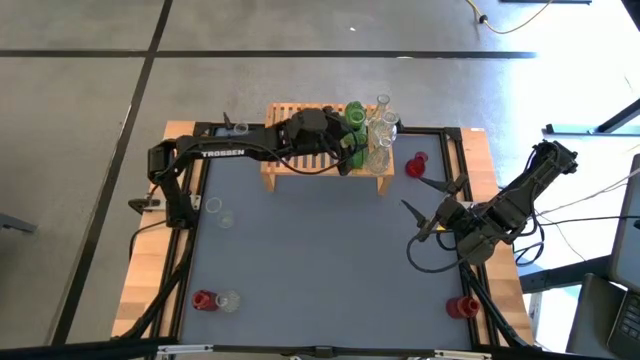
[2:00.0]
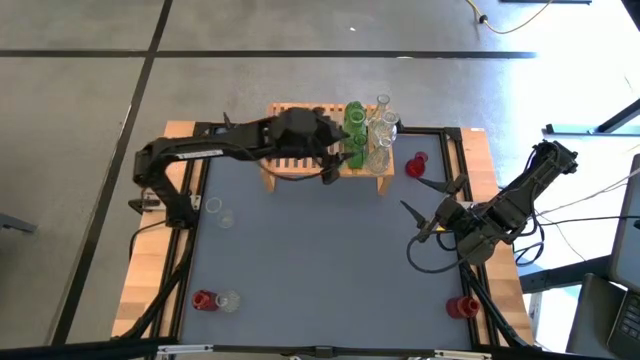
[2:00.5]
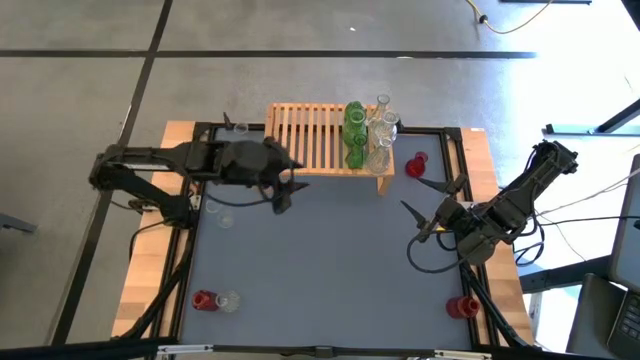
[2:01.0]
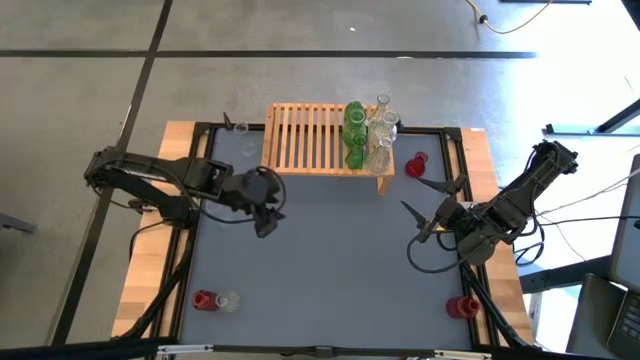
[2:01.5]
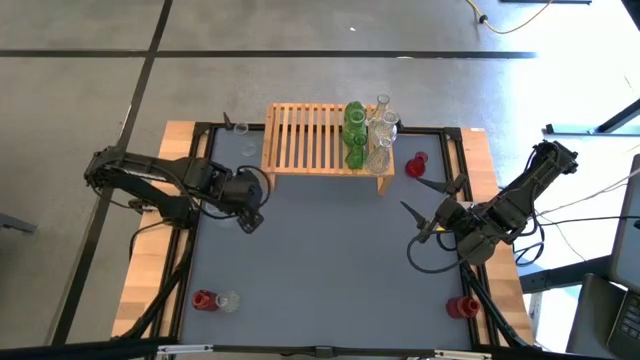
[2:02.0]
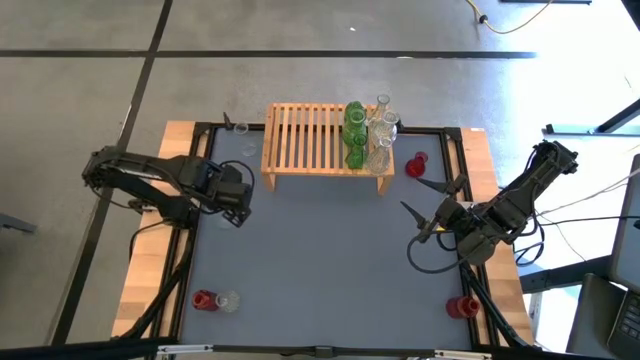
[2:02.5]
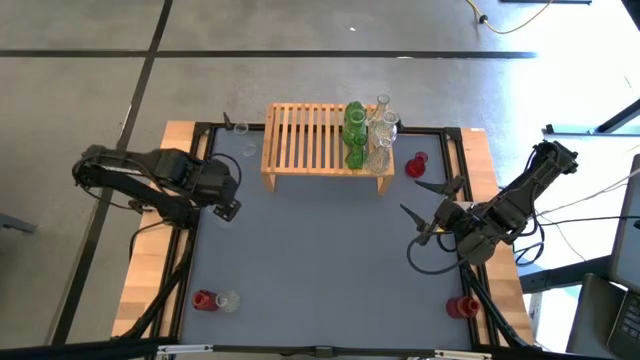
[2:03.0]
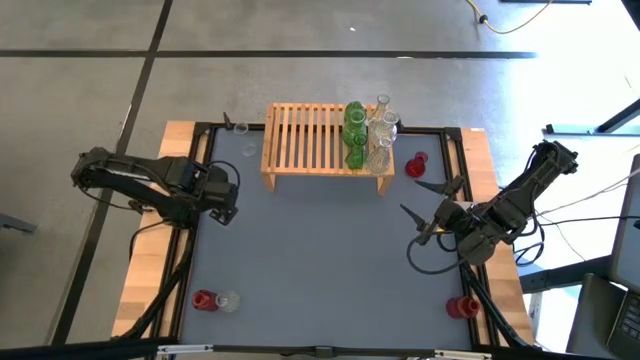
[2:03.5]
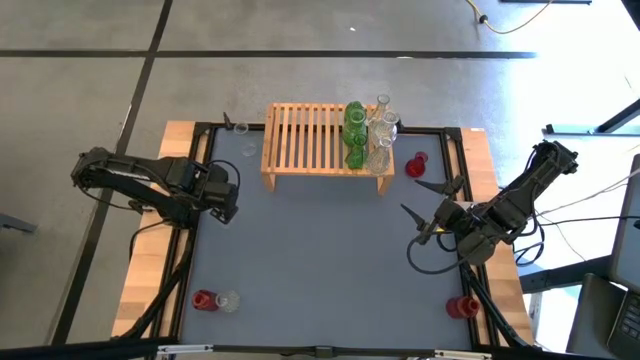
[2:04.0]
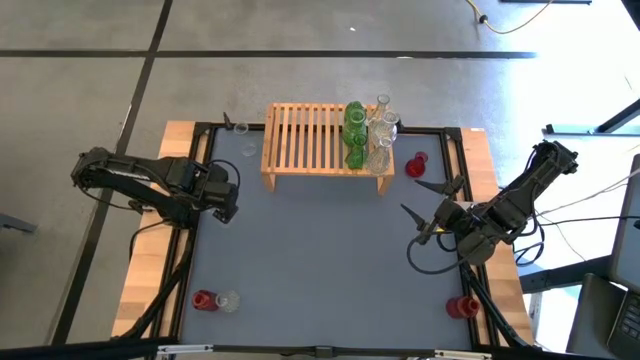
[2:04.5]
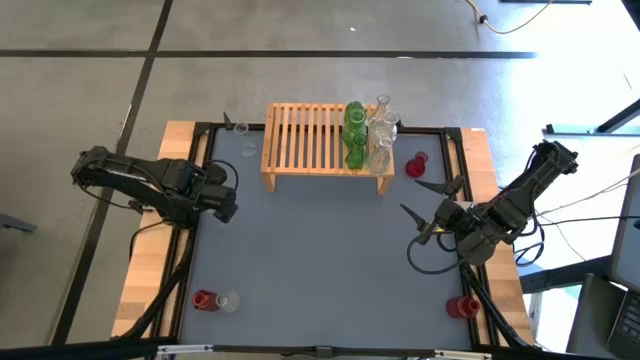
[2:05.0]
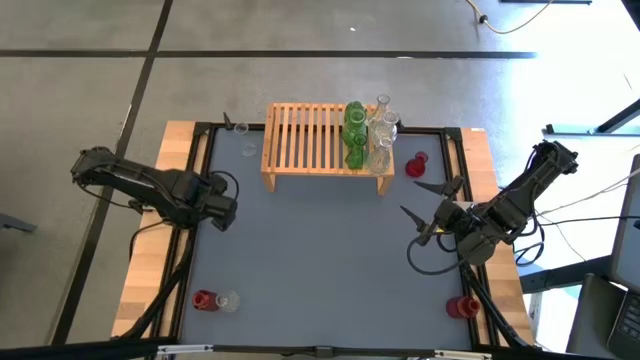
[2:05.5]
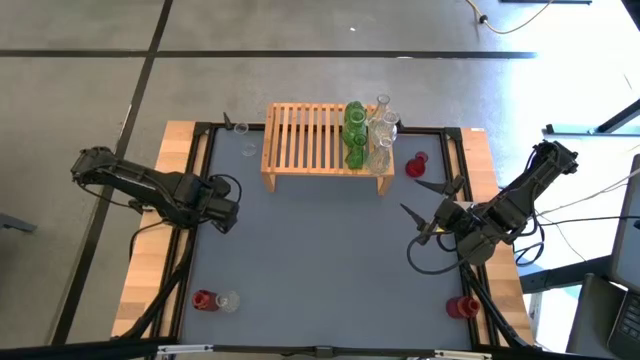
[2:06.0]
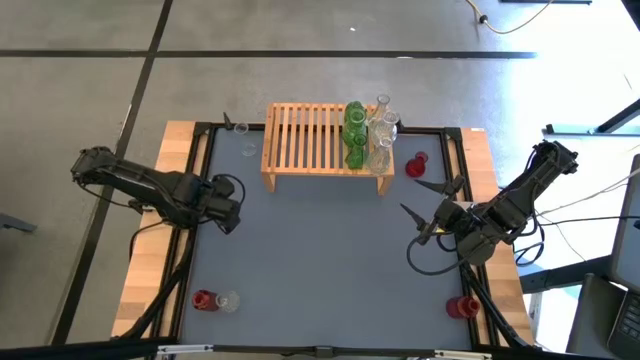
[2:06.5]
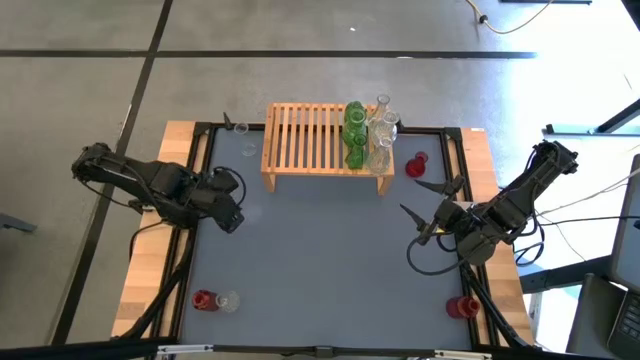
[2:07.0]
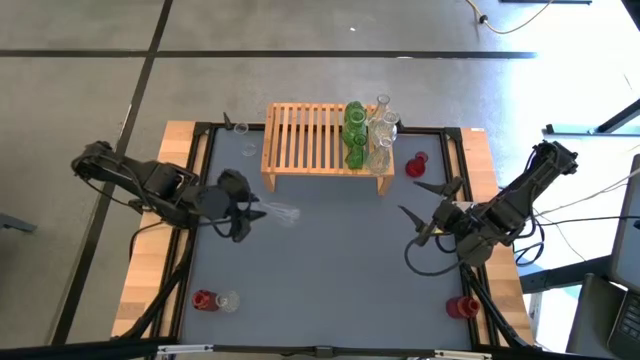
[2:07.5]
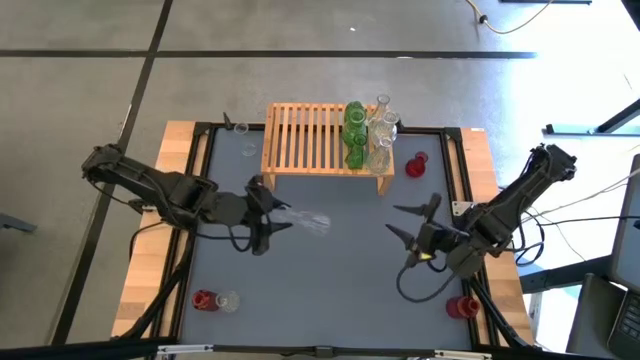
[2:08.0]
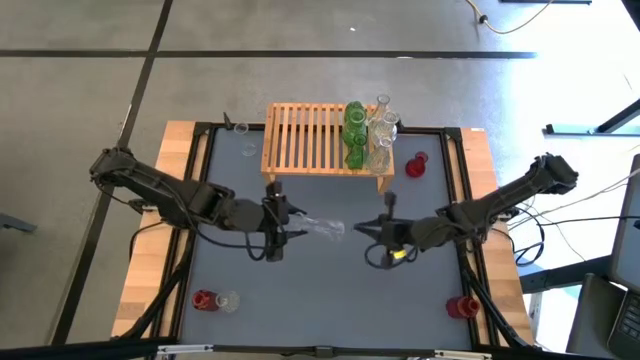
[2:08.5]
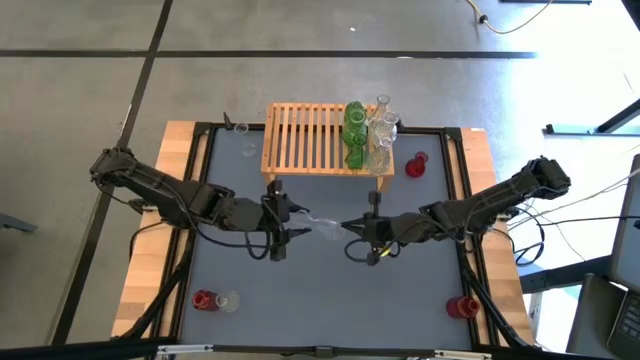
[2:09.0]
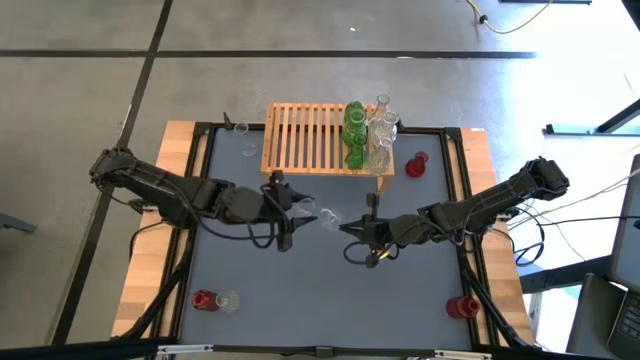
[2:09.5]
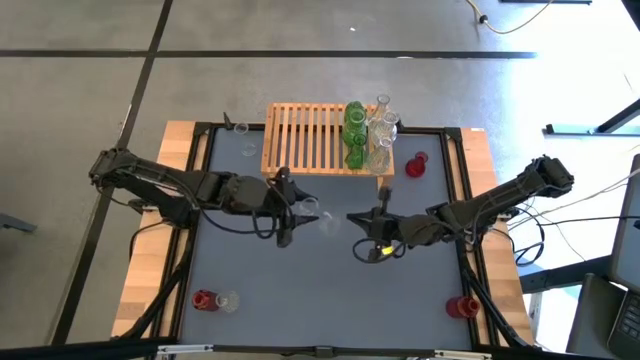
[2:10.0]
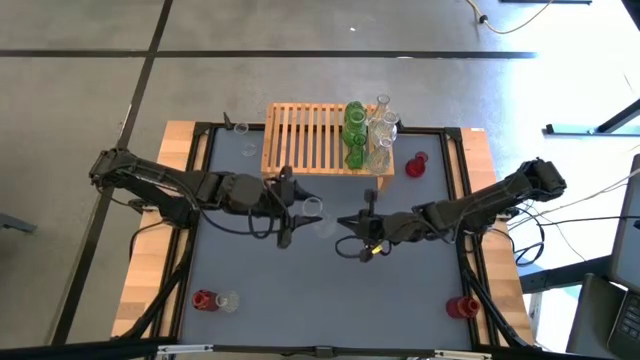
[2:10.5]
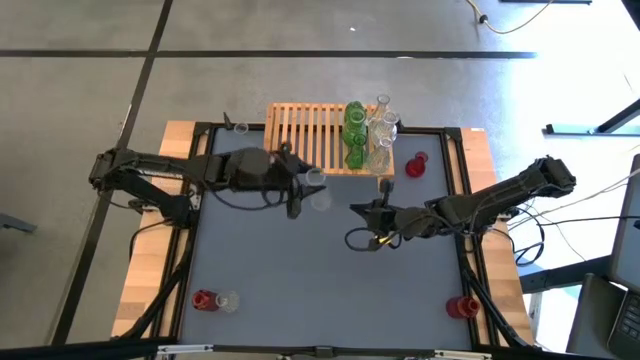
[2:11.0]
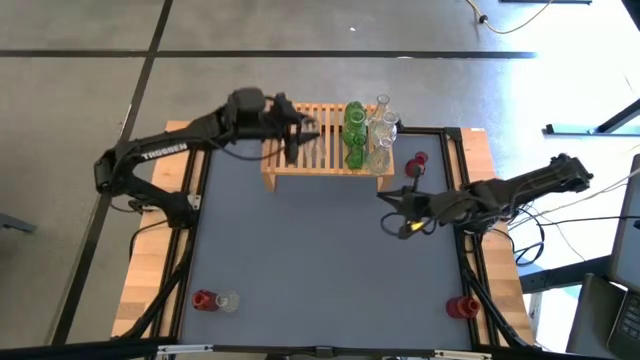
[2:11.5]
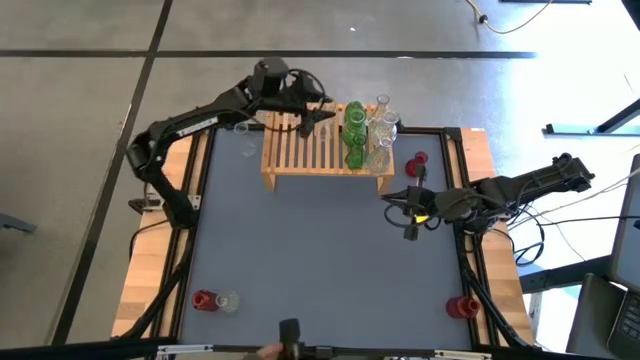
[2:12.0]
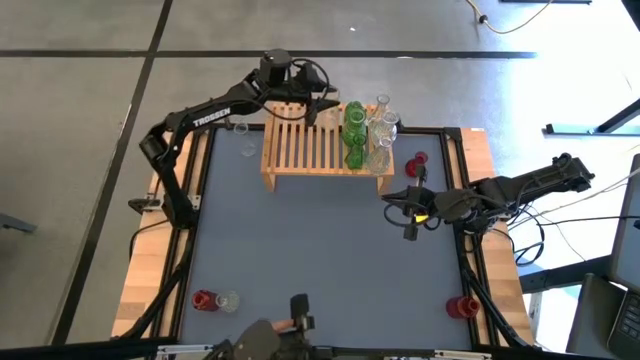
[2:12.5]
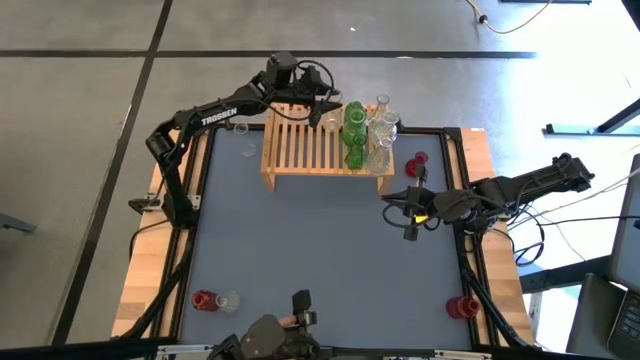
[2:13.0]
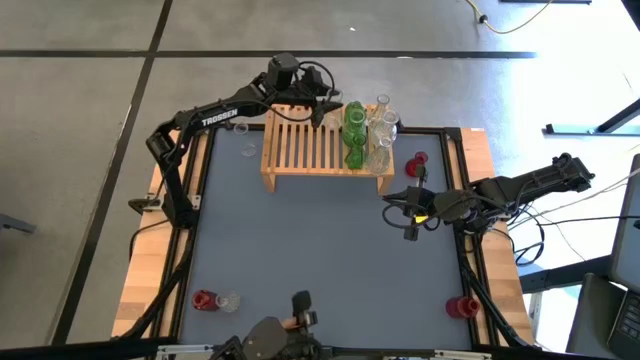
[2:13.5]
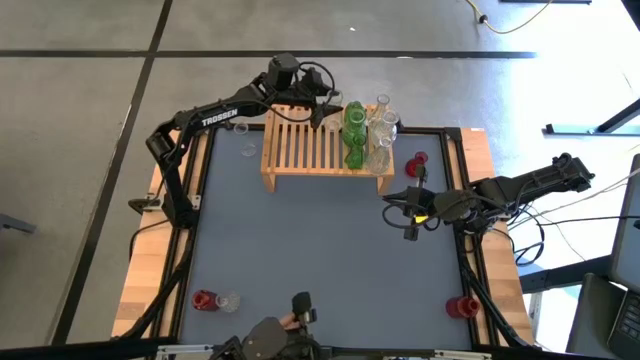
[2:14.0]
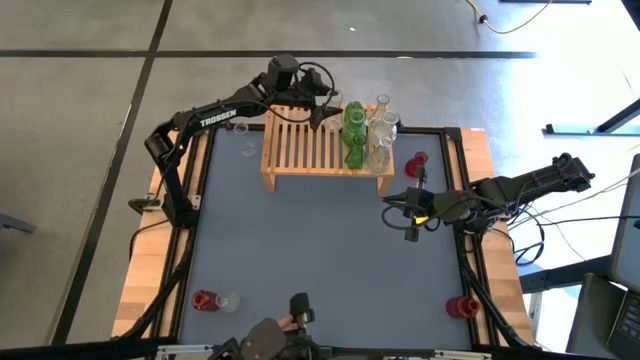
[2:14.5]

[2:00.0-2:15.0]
Task: sort vases onto shelf
Put the transparent vase on the shelf

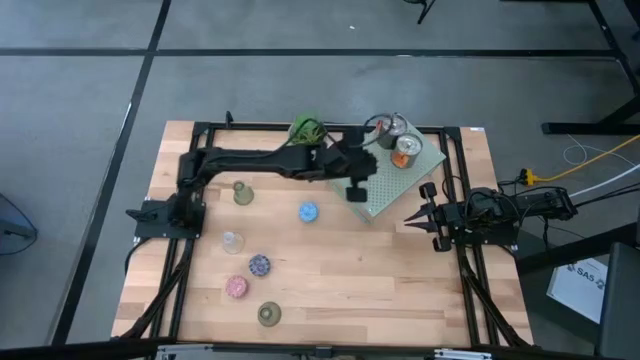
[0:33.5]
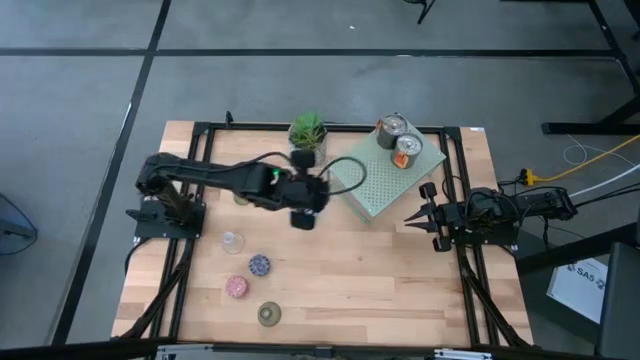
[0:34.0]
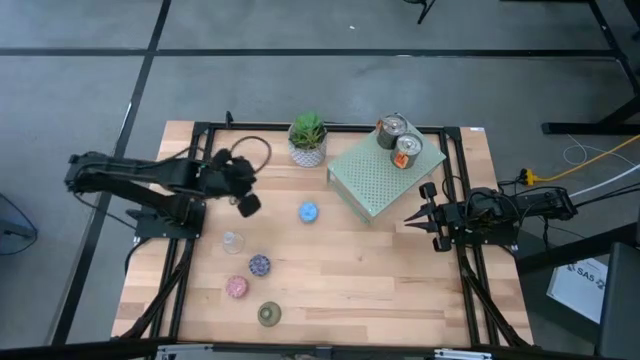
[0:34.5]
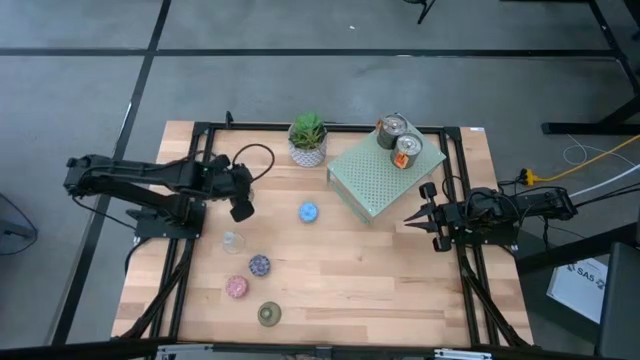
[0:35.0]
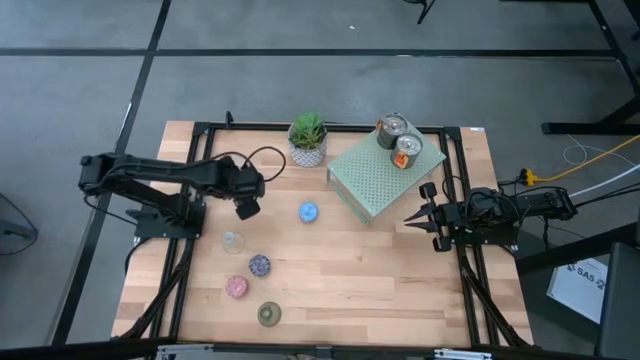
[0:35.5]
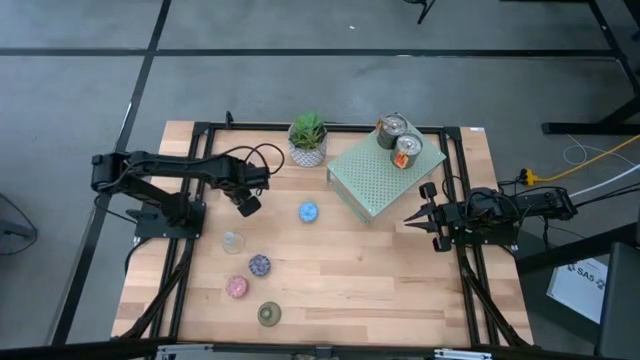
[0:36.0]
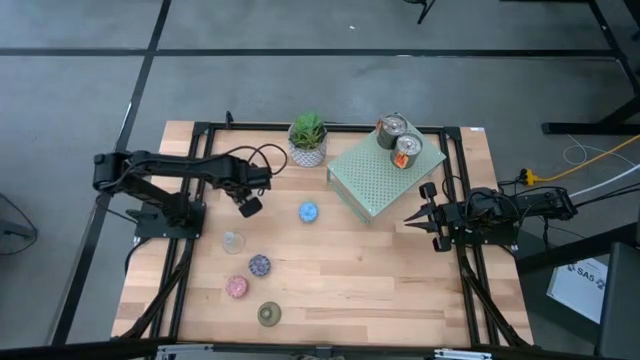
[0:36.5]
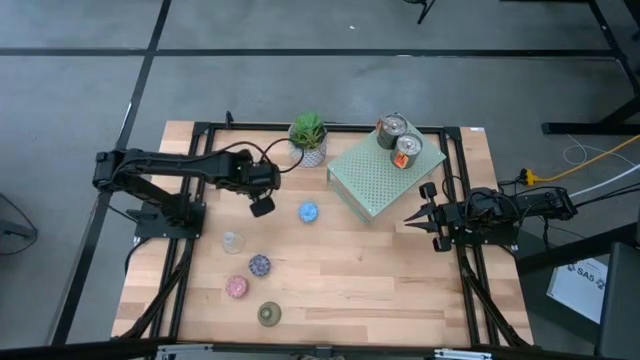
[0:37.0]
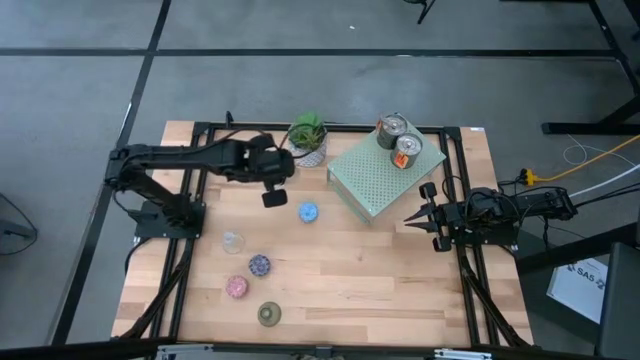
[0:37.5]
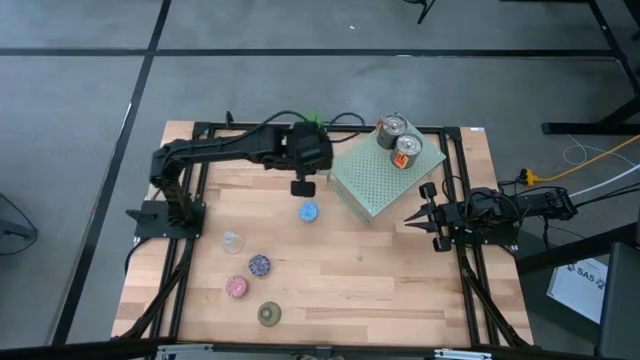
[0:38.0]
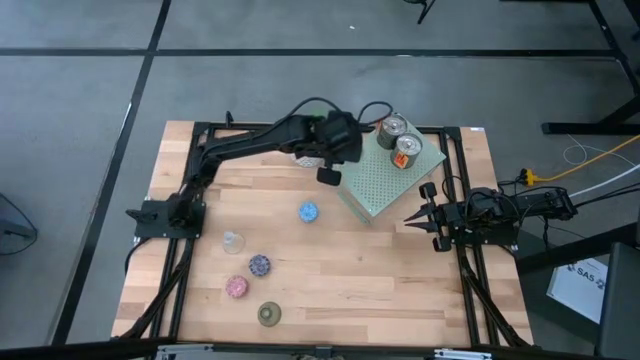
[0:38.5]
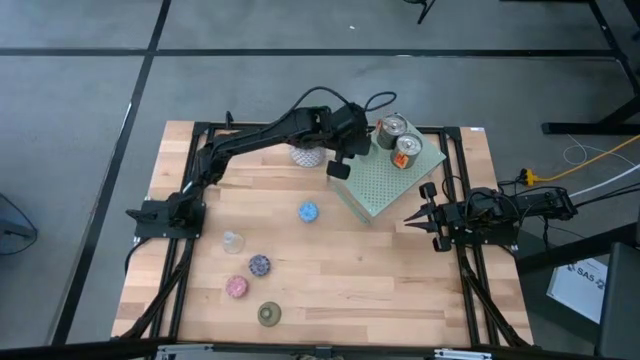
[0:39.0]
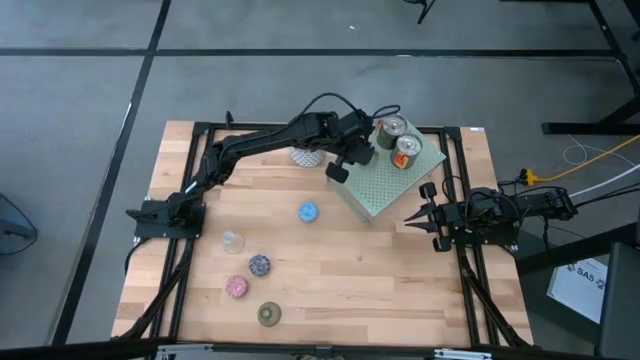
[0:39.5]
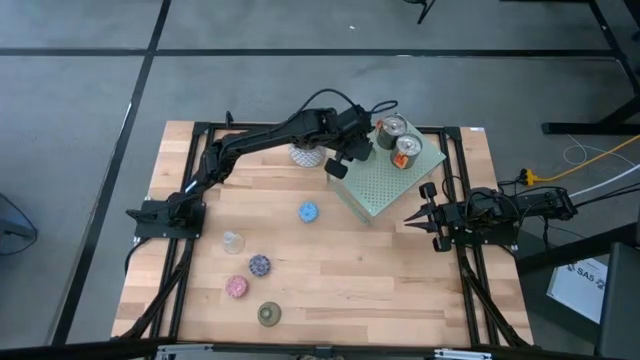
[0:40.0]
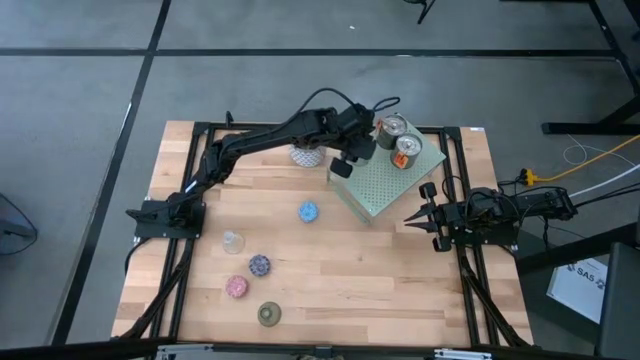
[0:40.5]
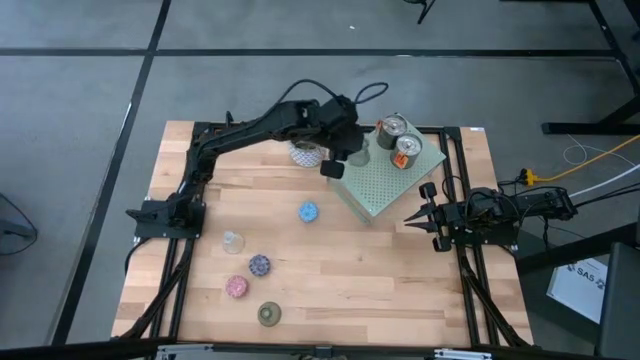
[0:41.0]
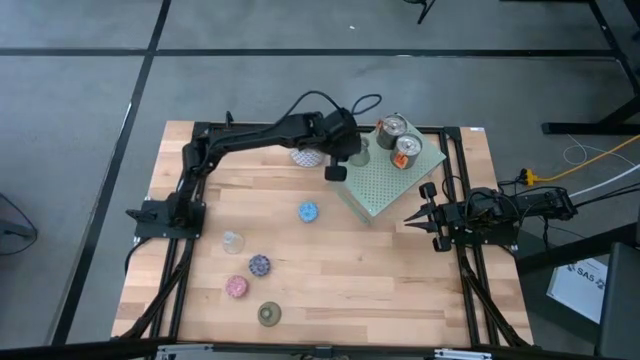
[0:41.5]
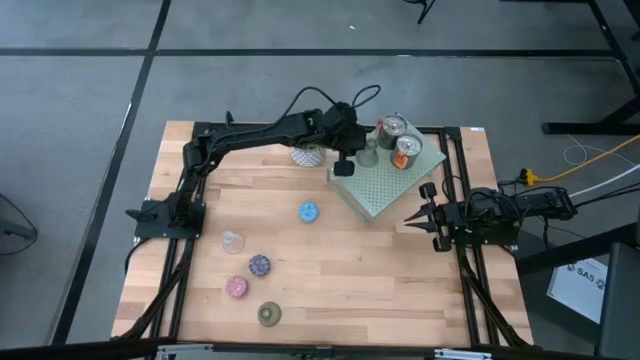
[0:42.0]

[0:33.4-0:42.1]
Task: Pick & Place candle stick holders
Put the top green candle holder on the shelf
